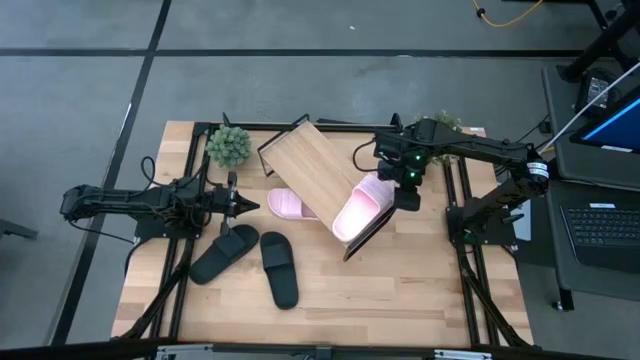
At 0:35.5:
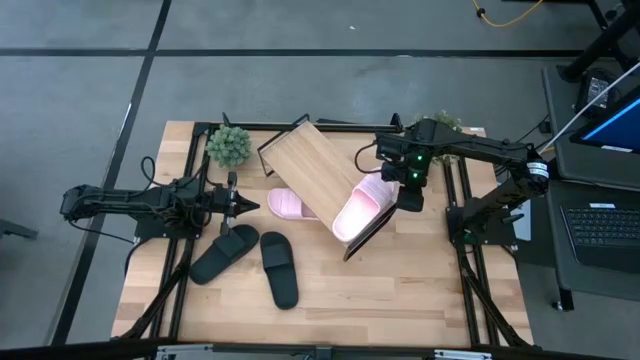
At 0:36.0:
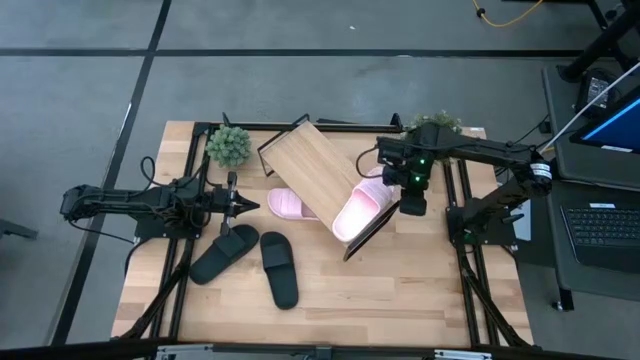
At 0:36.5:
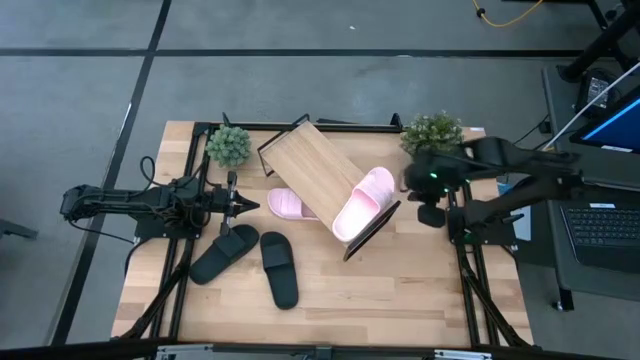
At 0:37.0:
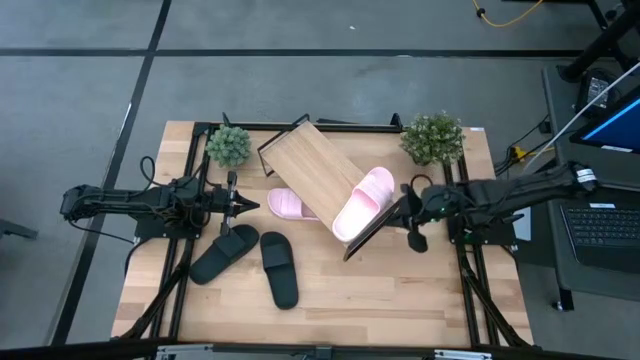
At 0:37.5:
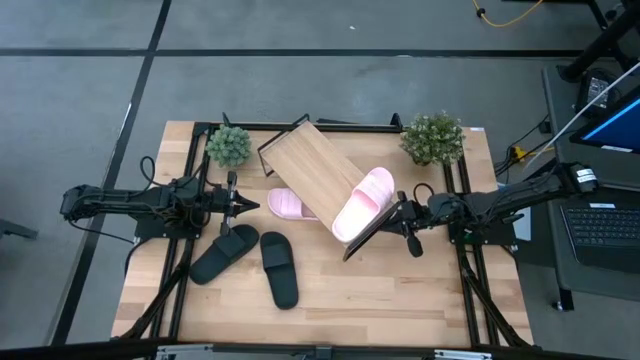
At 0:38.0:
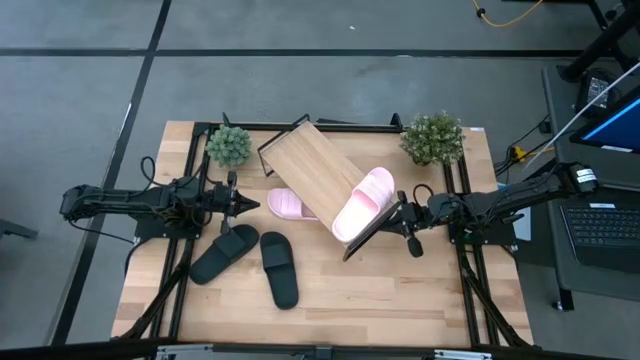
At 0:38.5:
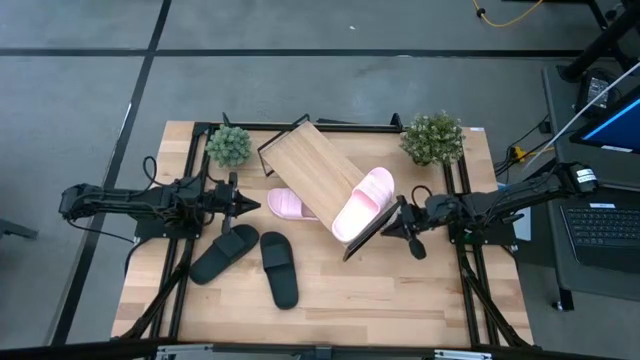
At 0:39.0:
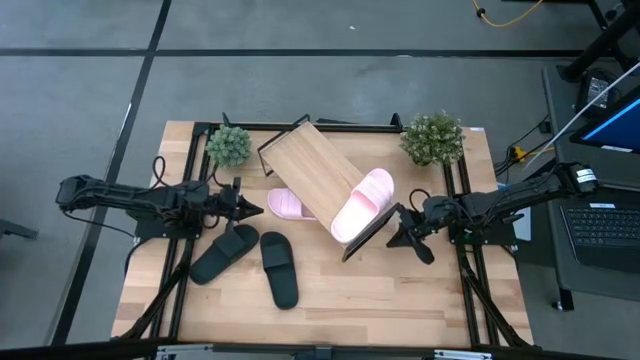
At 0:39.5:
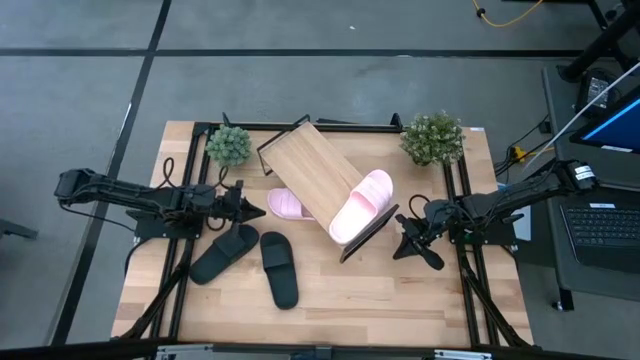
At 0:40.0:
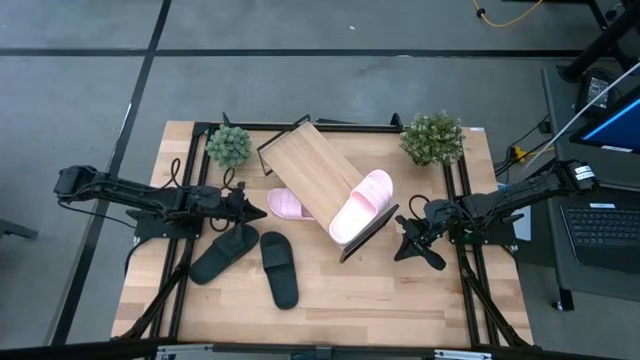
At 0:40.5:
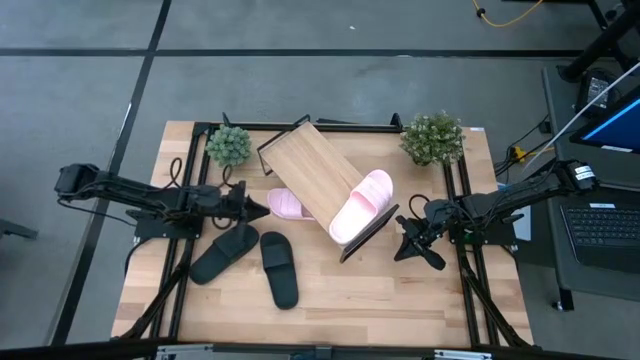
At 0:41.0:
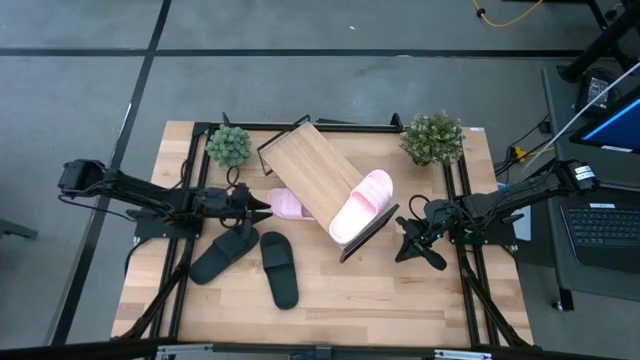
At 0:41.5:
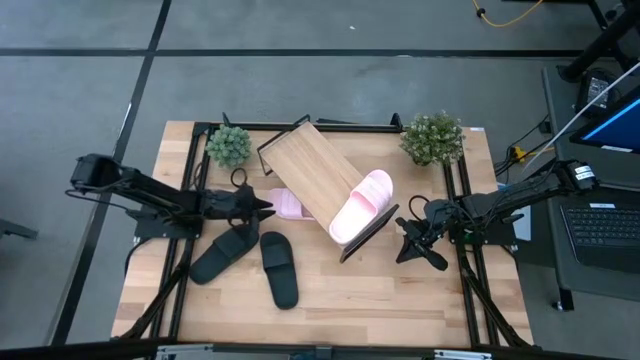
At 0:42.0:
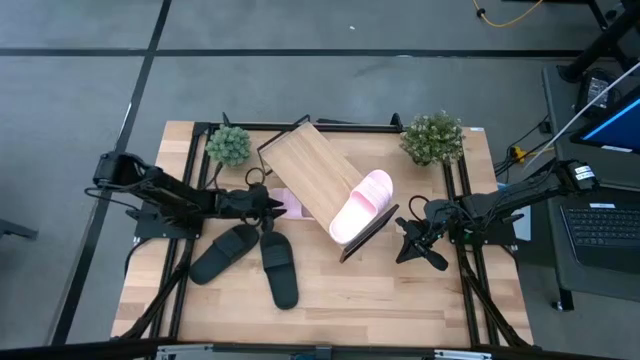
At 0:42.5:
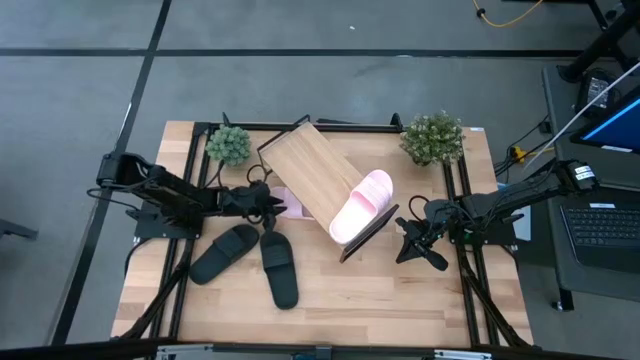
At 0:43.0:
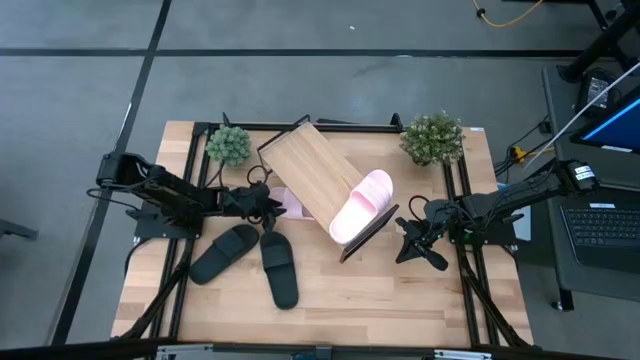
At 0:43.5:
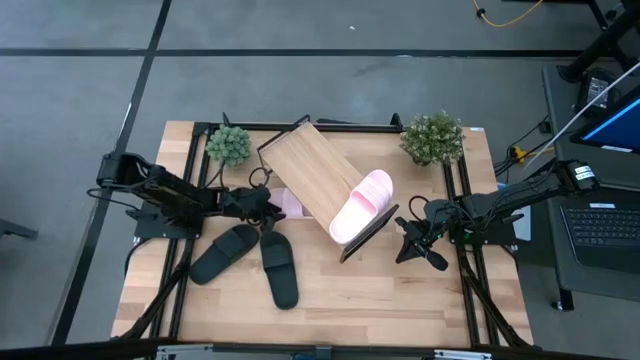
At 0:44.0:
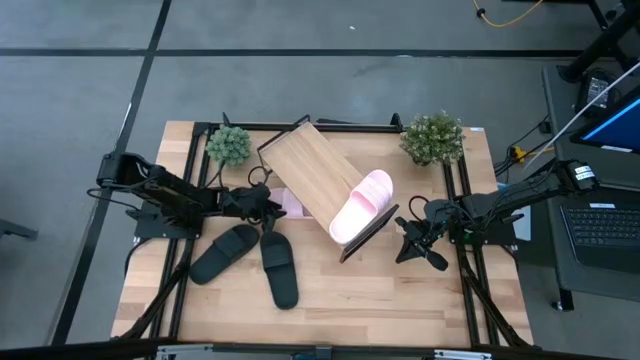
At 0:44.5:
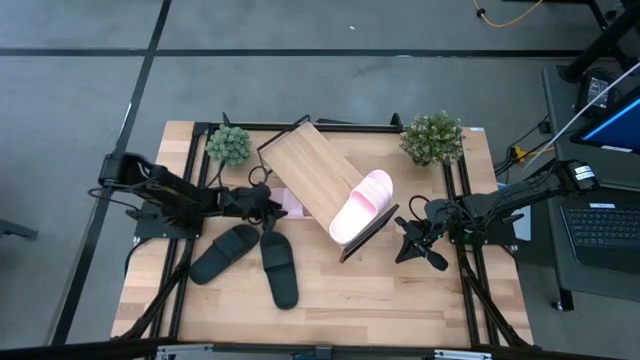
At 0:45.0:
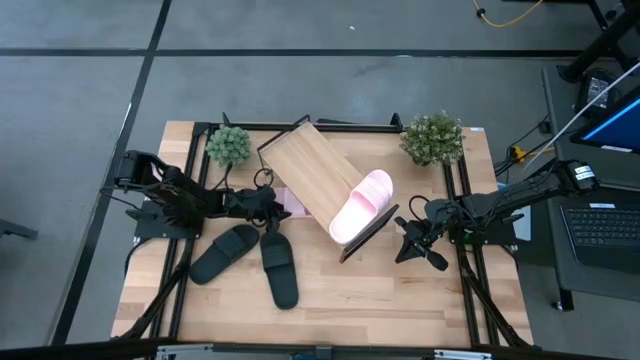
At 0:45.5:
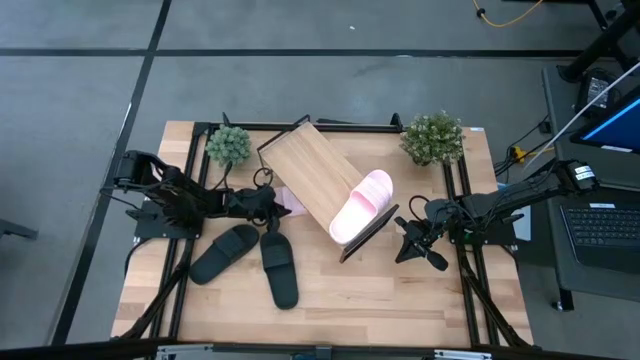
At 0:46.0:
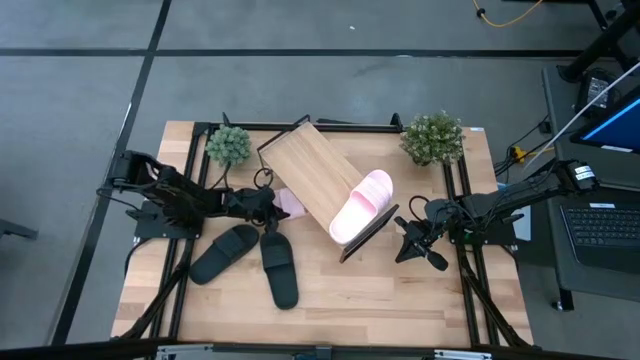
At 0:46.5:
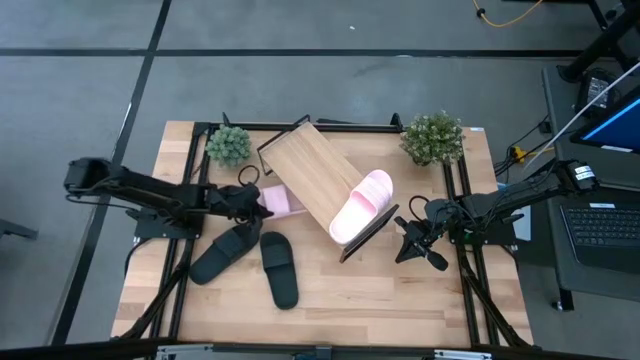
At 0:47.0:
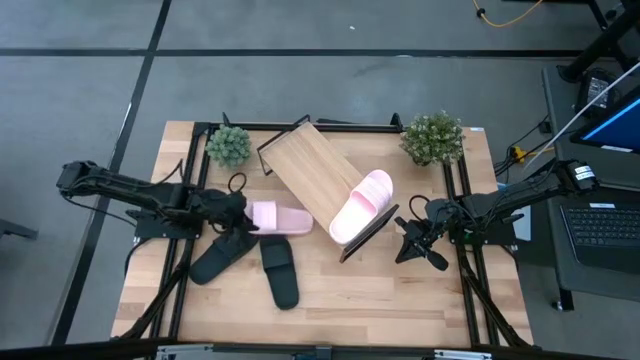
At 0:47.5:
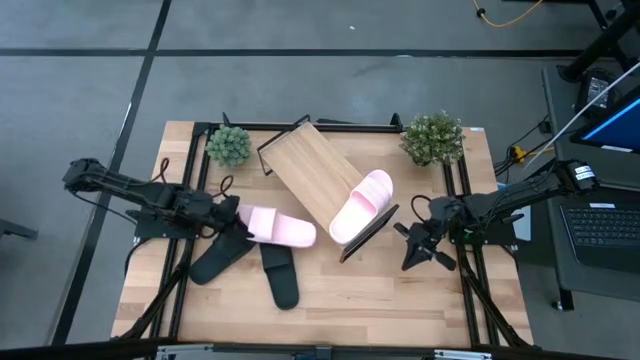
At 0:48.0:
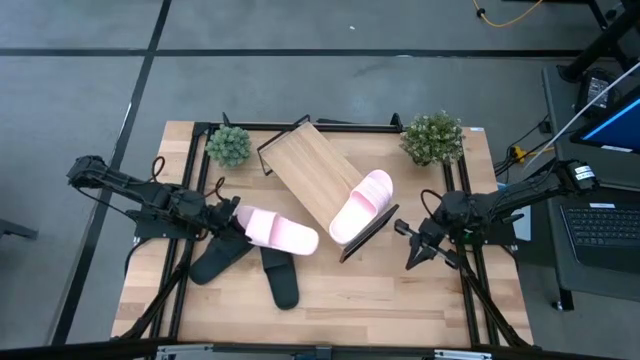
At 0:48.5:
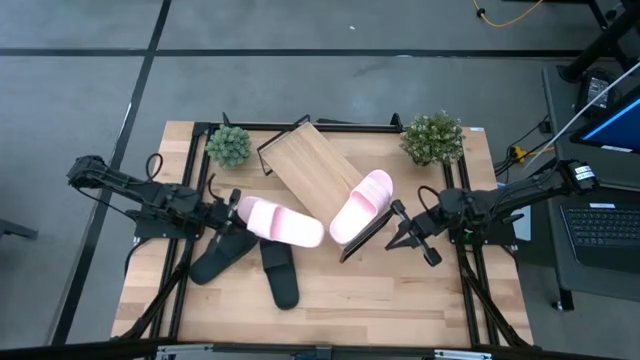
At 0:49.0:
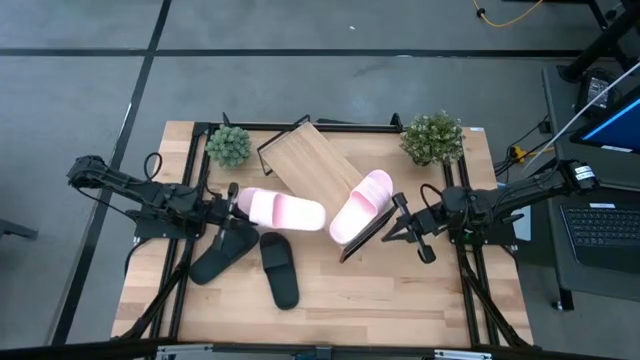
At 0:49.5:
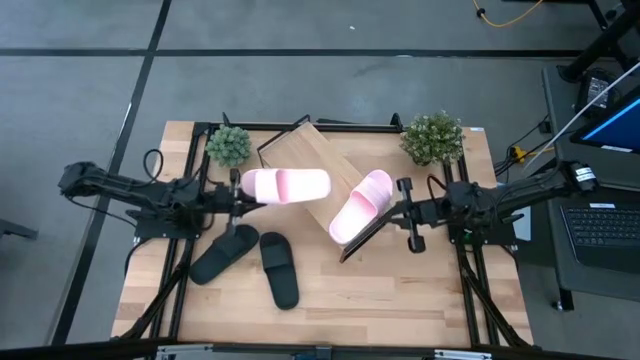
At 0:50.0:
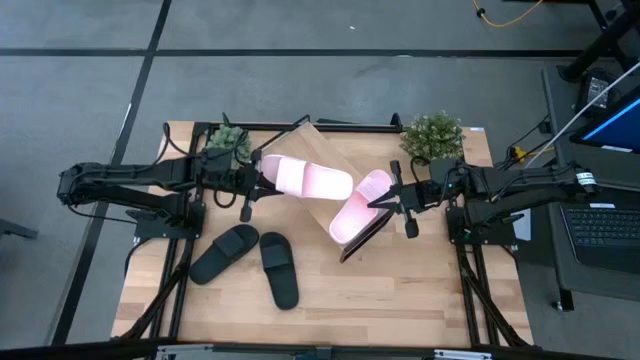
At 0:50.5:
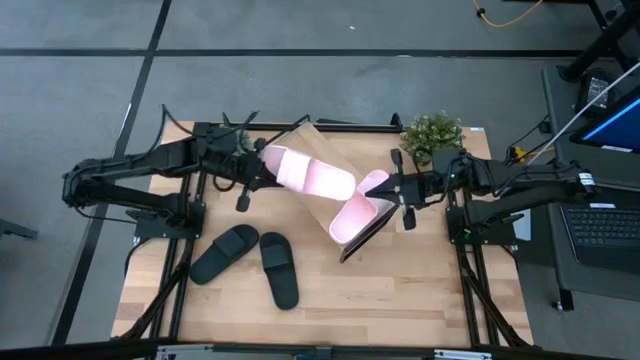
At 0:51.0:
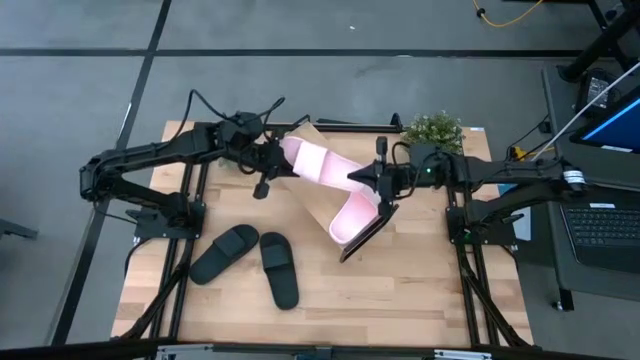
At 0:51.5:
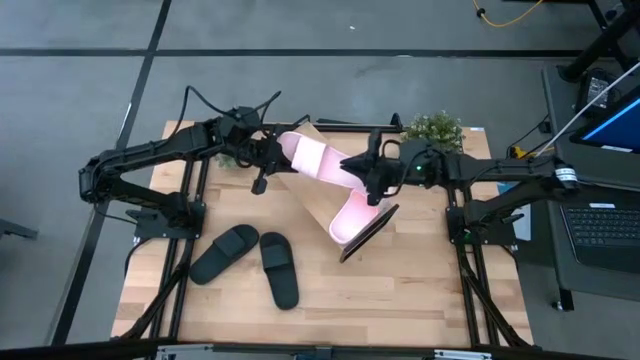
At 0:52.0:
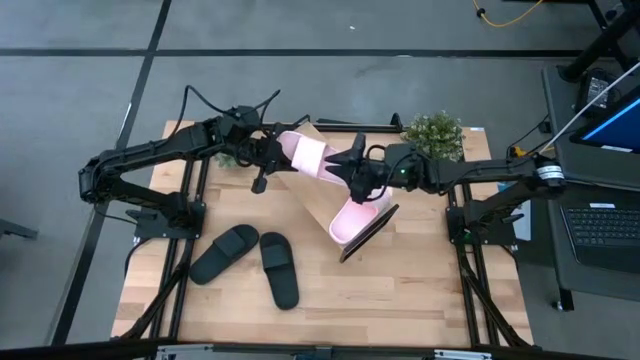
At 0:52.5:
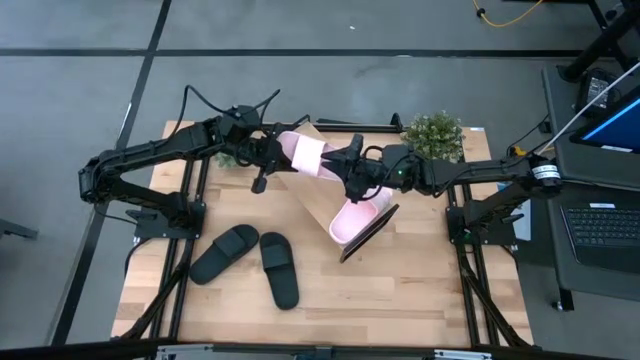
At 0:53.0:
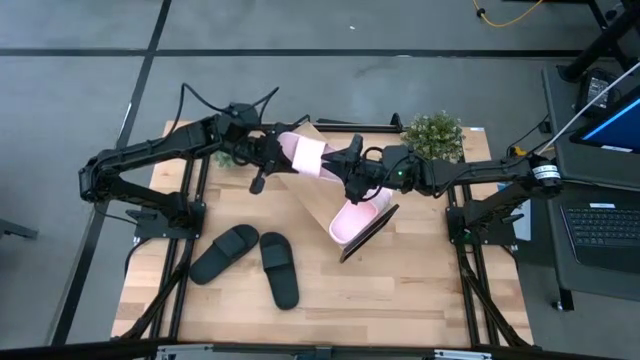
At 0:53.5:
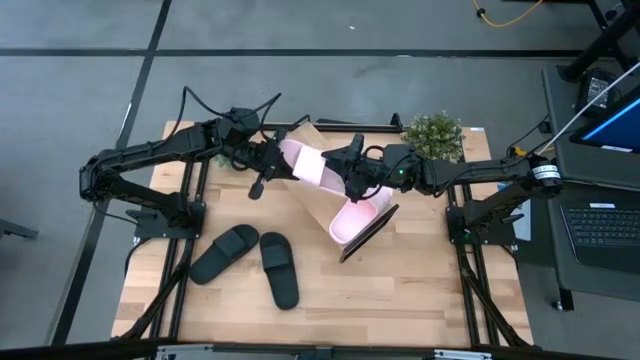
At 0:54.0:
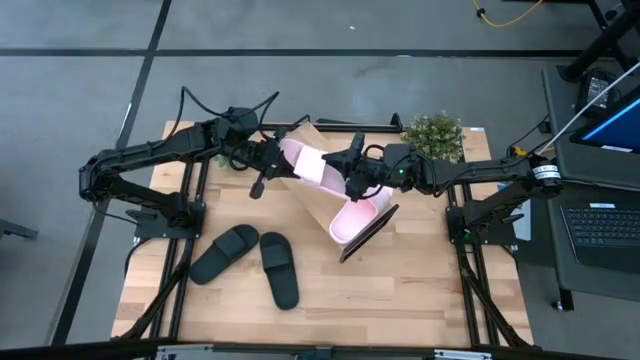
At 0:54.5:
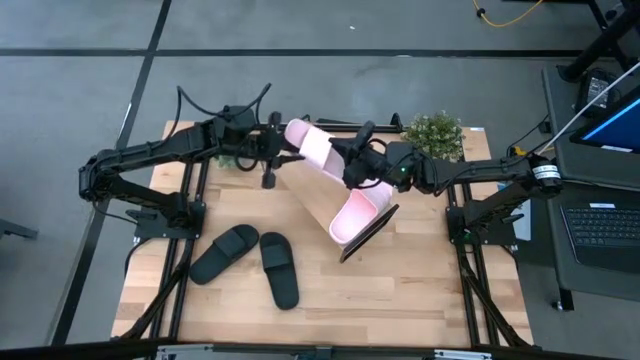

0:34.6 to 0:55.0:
Task: Pick and place slides into the shelf
Put the pink slipper on the shelf

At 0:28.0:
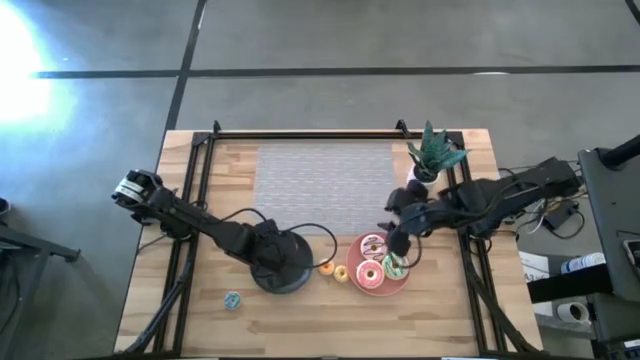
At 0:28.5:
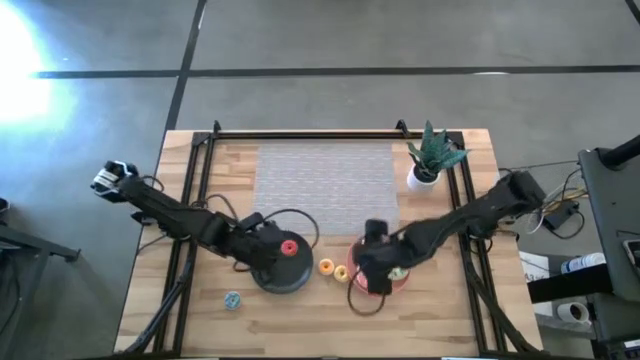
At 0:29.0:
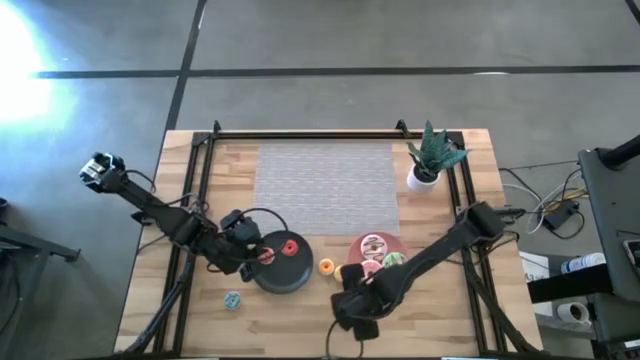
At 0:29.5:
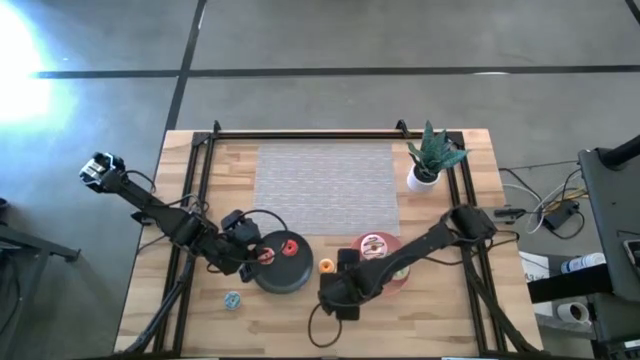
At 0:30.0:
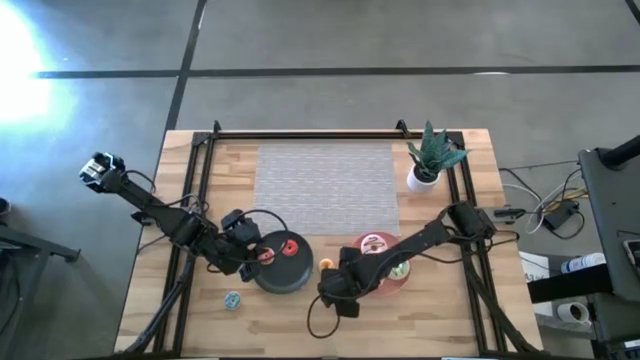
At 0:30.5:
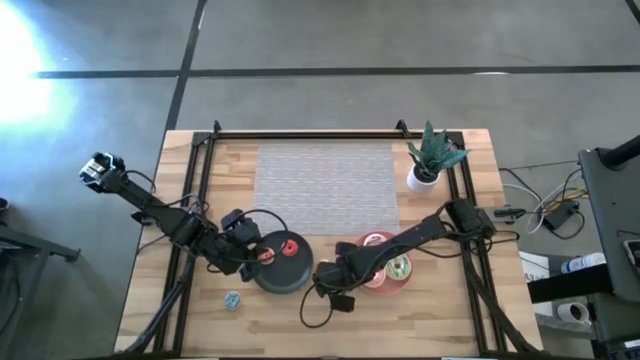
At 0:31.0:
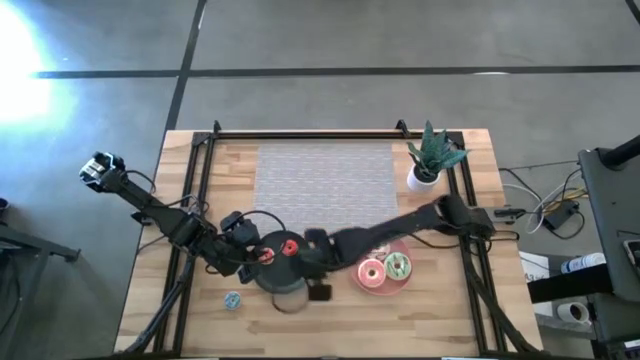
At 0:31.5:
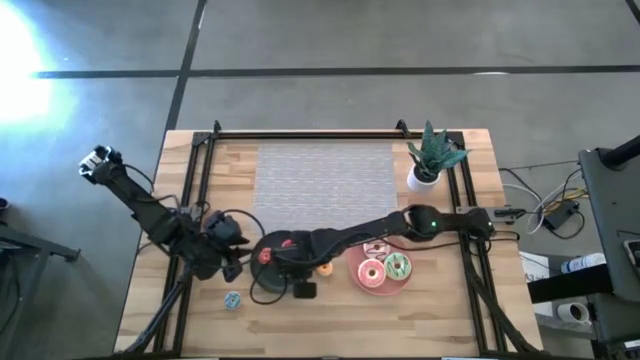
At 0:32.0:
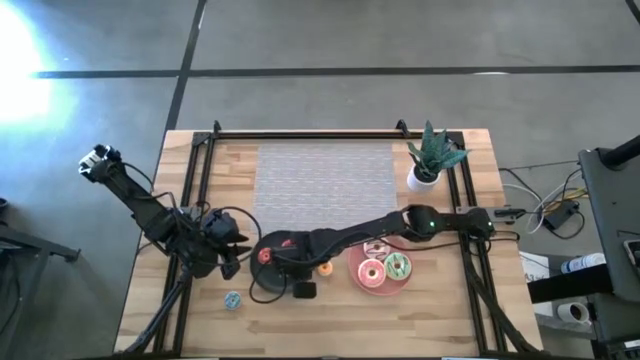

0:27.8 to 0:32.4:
Task: Pick & Place donuts
Put the small yellow donut on the black plate
